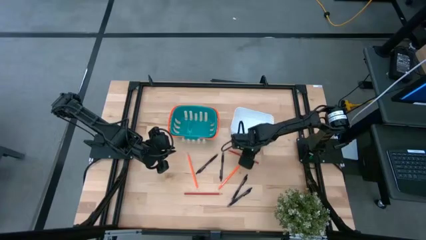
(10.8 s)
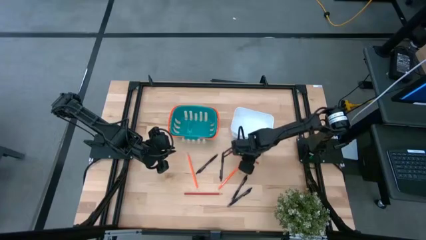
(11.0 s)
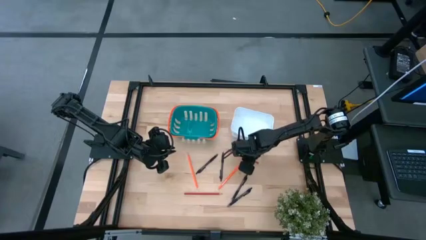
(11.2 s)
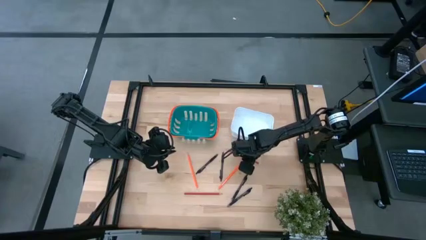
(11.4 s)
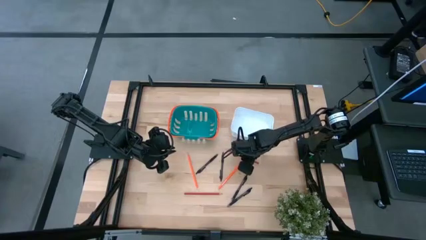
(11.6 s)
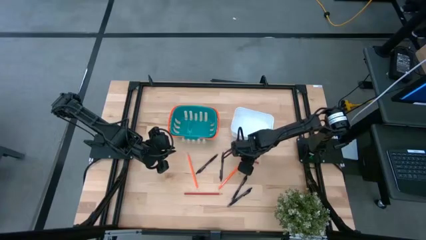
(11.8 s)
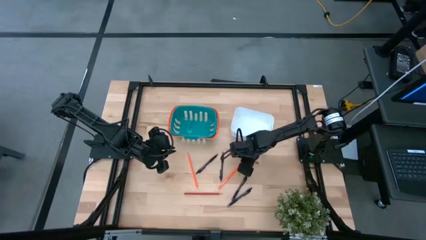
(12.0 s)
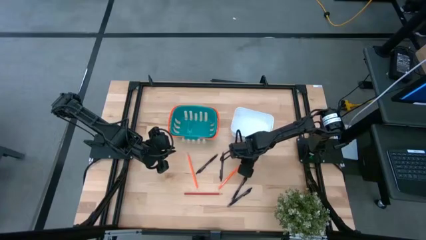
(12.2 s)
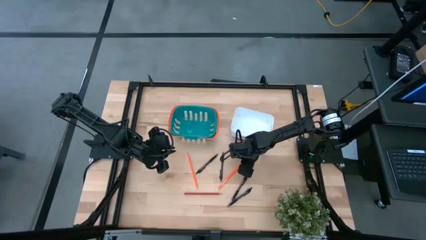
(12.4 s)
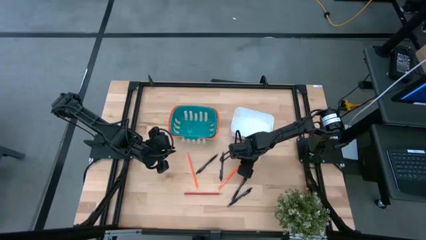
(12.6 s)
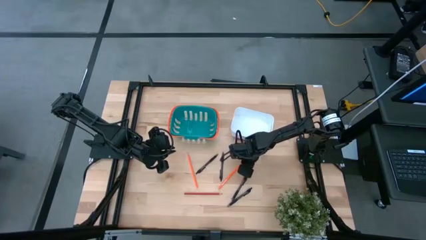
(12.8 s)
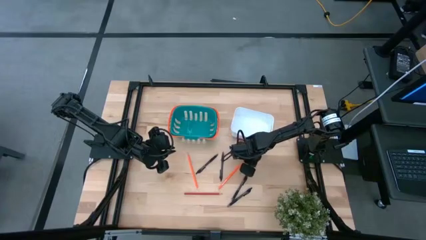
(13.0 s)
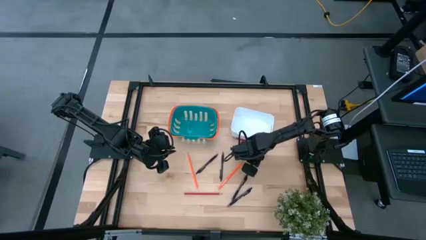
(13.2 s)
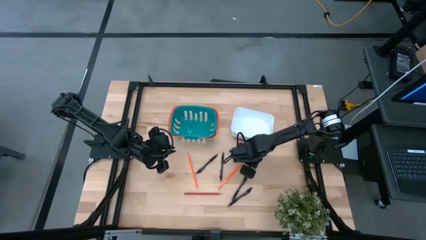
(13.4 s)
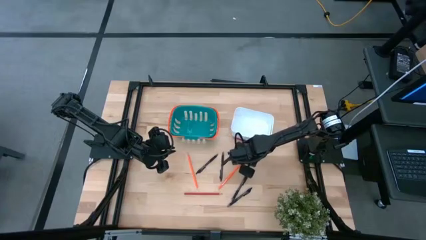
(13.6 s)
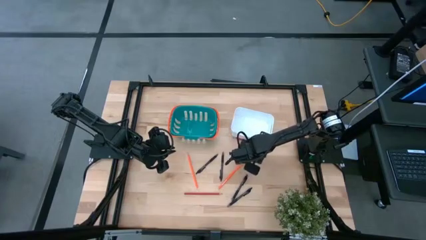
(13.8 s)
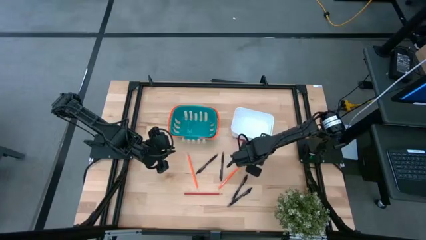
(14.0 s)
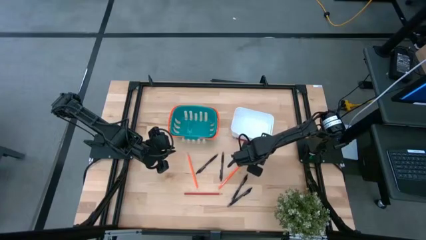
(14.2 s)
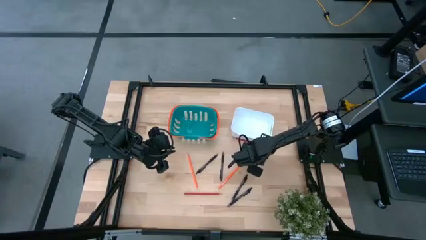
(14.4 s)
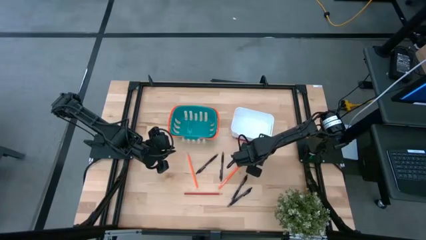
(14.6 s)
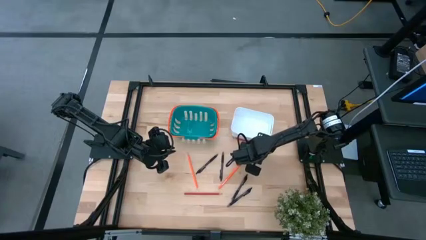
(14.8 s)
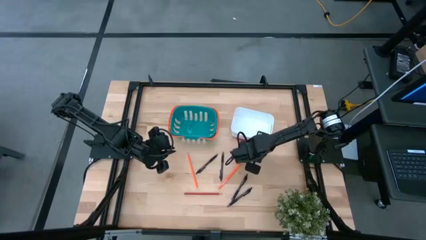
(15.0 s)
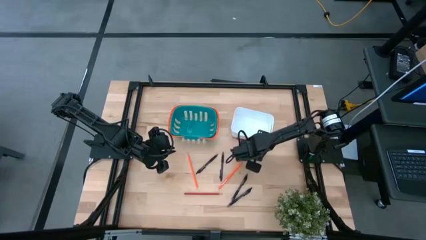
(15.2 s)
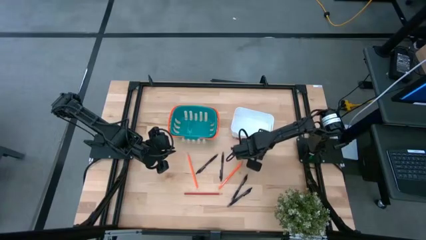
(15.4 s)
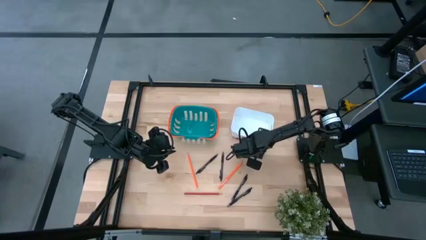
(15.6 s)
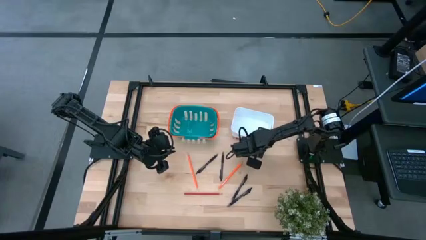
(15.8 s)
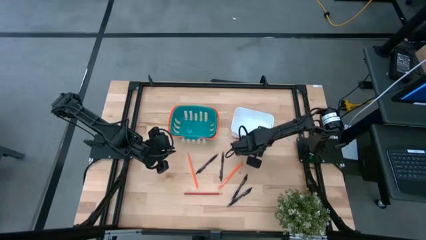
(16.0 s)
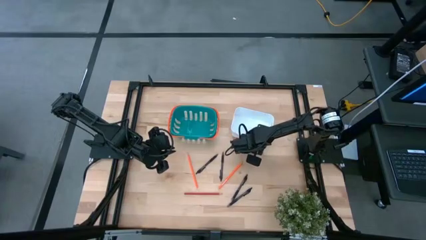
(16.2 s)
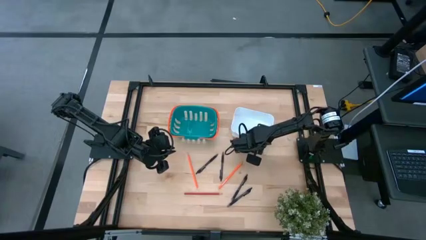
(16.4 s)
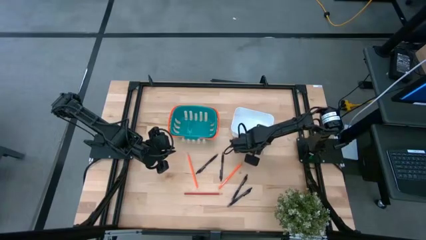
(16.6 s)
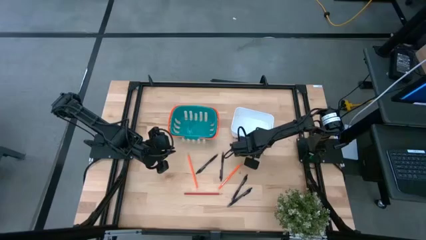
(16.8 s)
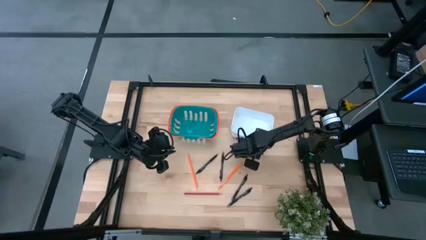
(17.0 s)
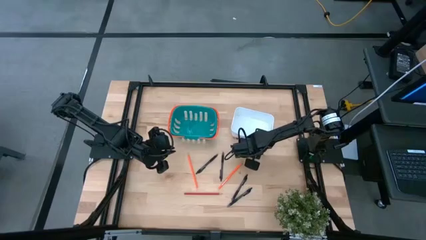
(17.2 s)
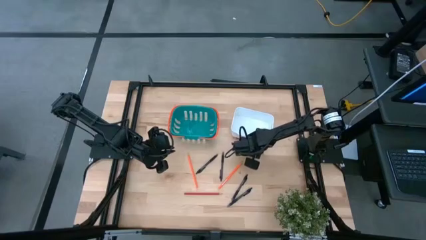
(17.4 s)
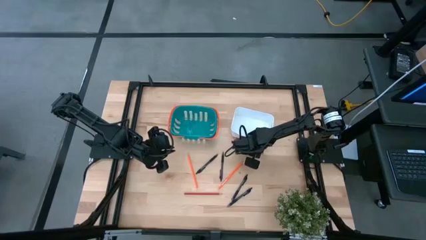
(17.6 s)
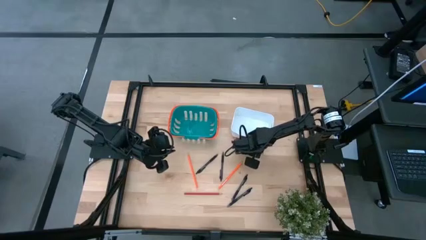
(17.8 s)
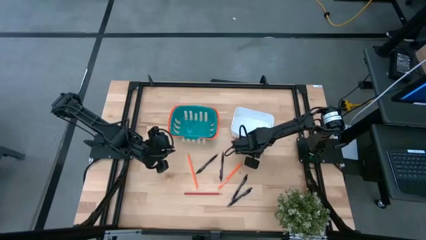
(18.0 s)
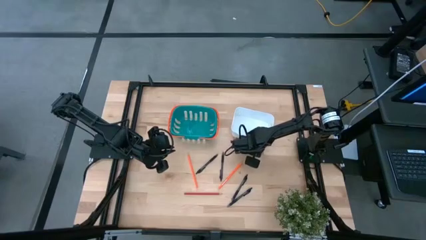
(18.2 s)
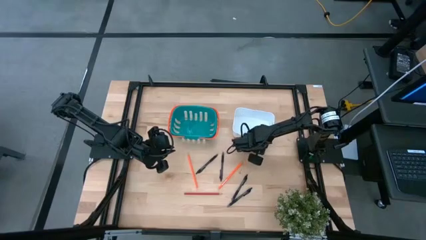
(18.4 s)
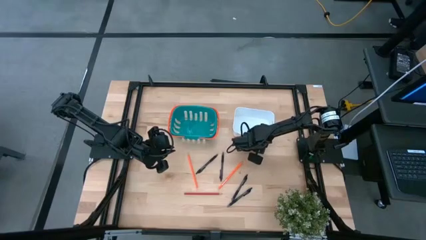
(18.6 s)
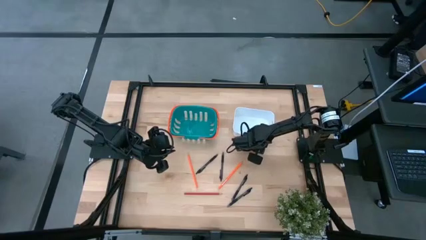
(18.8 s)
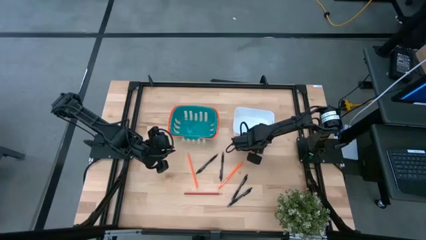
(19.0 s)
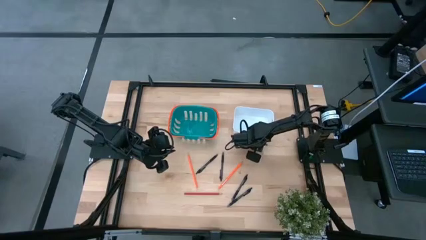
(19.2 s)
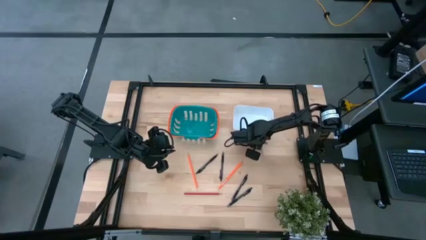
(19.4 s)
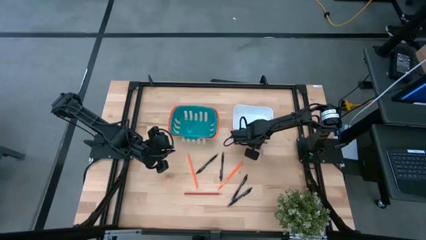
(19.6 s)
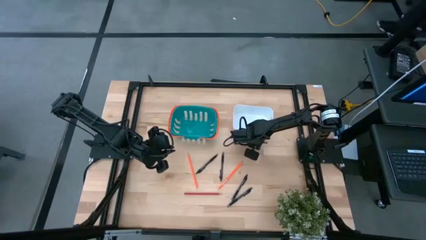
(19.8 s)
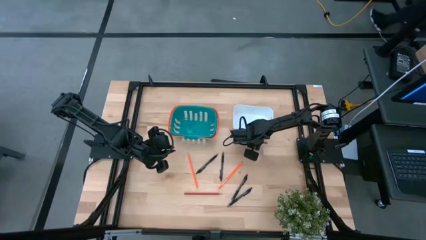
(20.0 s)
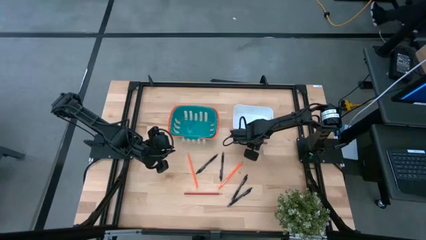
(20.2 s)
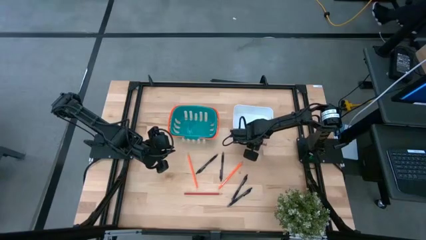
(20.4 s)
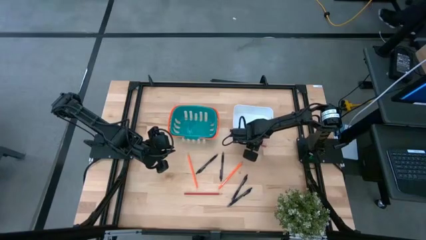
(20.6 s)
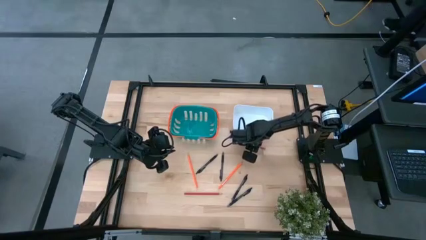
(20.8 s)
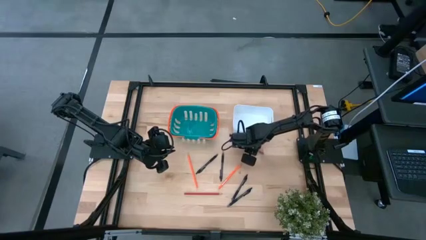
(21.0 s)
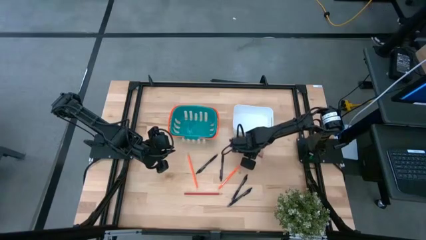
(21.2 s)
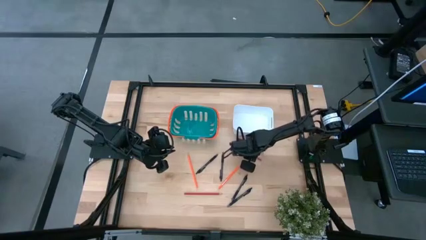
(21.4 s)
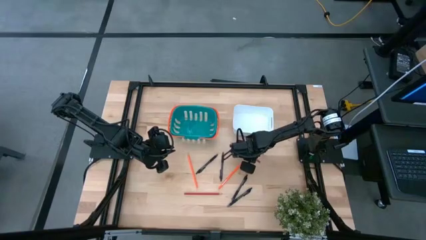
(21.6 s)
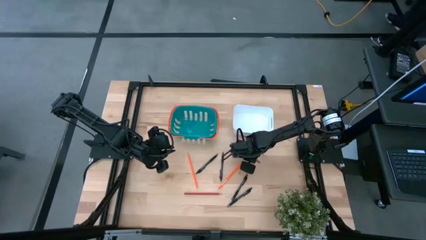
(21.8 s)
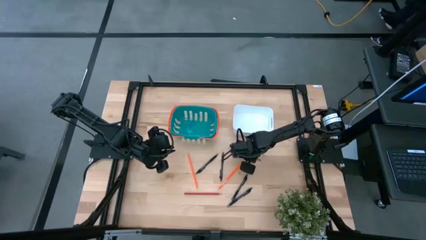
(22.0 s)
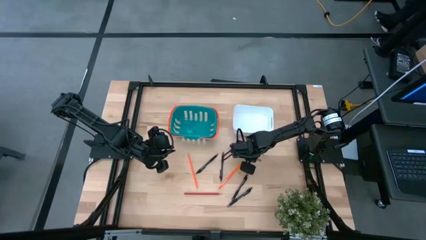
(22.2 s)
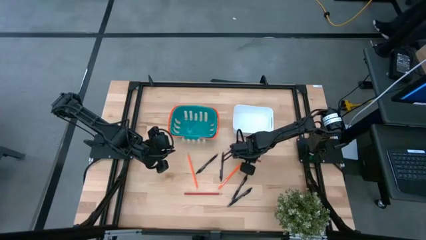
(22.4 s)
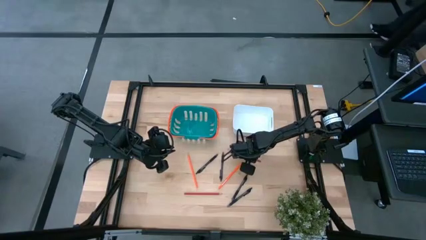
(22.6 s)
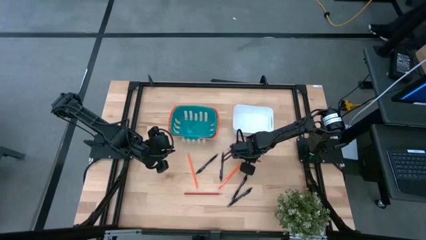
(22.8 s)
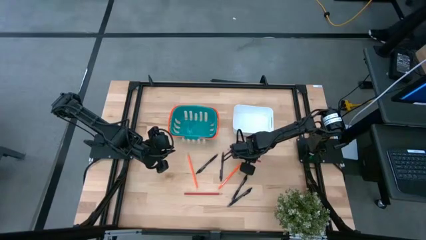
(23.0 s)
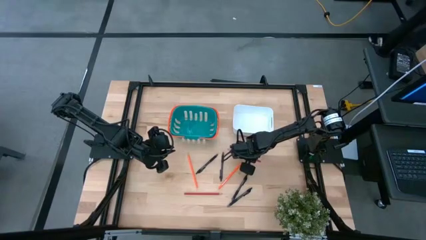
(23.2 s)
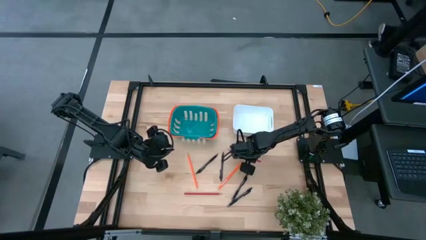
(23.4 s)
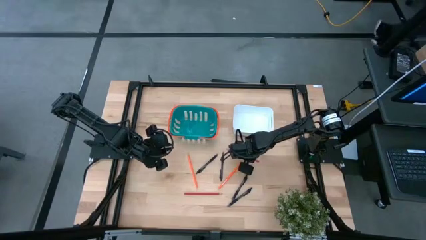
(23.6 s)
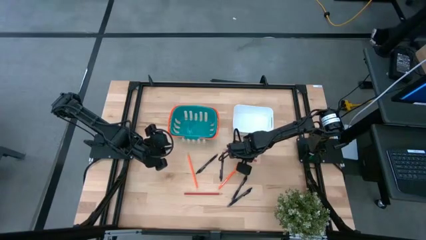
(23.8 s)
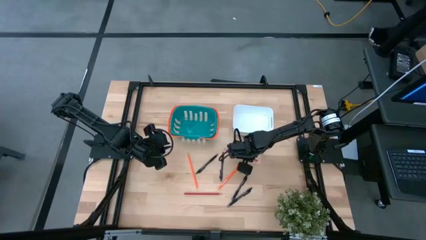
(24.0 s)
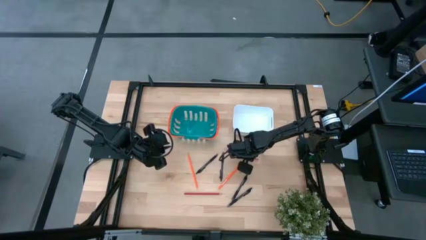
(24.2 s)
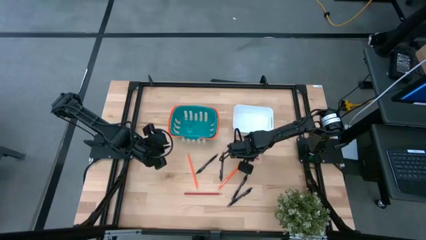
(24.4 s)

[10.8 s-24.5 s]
Task: Sort pens & pencils
Put the top red pencil into the blue bin

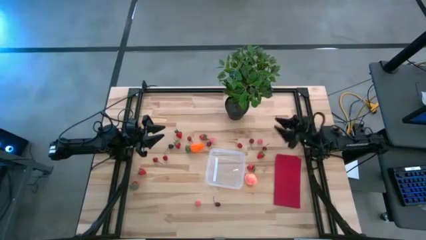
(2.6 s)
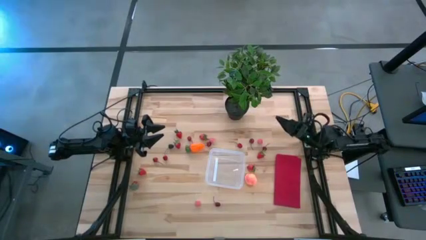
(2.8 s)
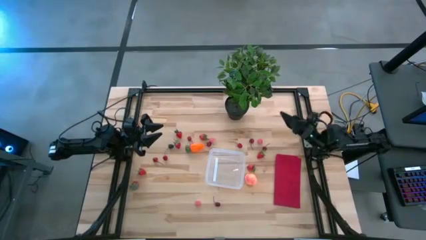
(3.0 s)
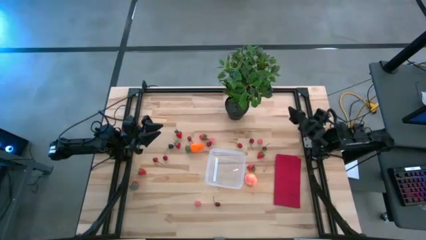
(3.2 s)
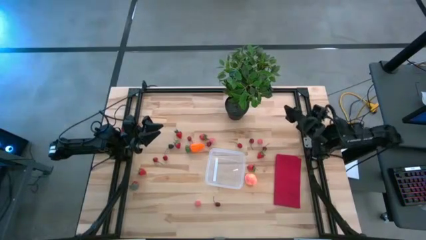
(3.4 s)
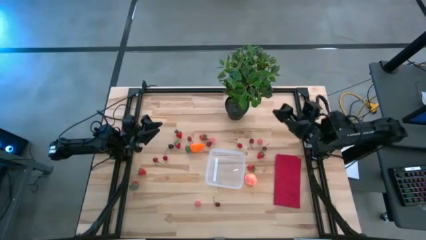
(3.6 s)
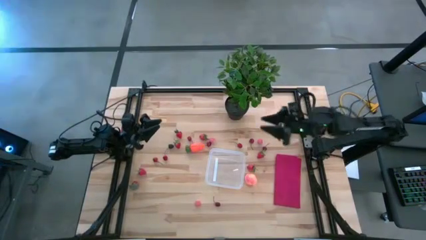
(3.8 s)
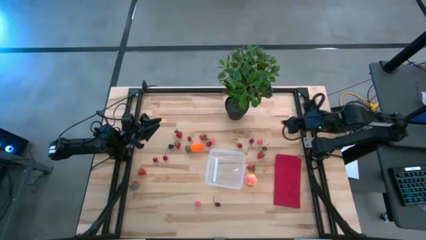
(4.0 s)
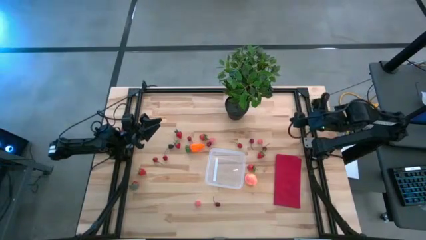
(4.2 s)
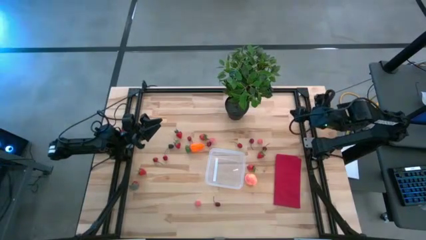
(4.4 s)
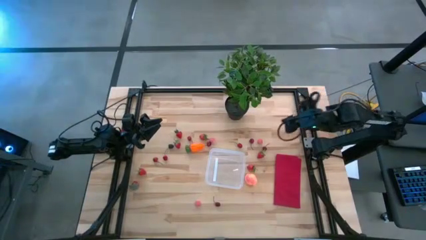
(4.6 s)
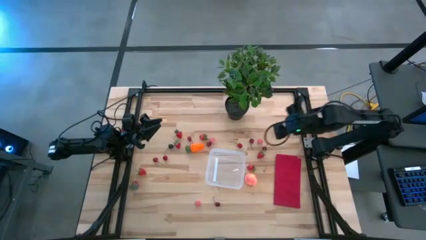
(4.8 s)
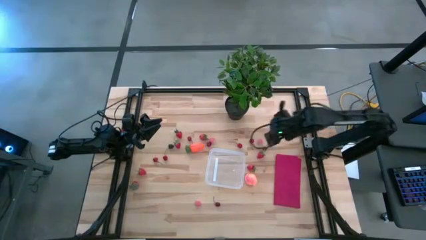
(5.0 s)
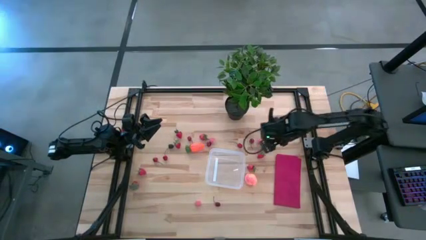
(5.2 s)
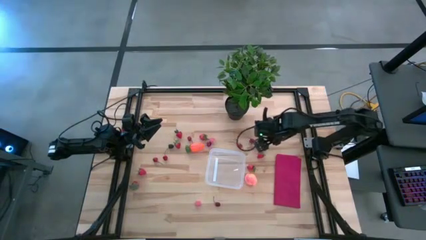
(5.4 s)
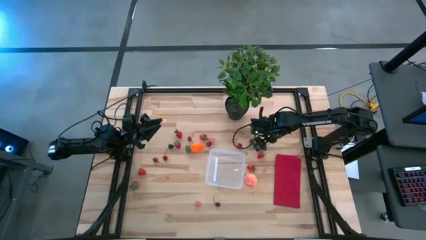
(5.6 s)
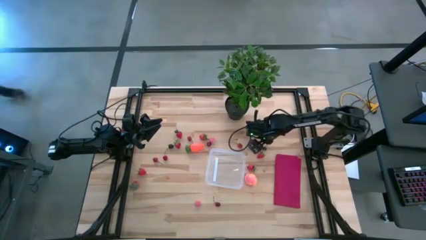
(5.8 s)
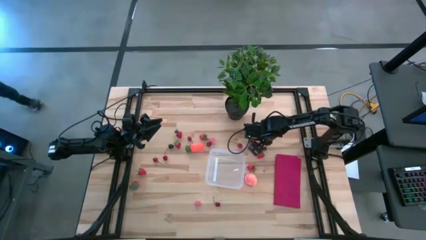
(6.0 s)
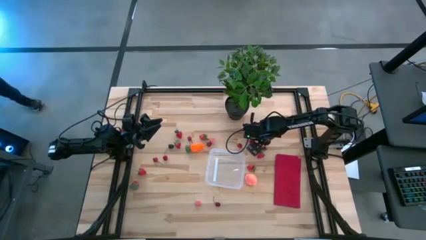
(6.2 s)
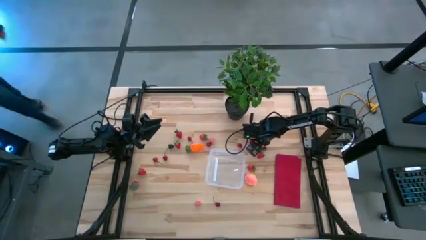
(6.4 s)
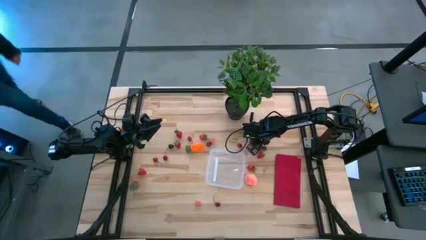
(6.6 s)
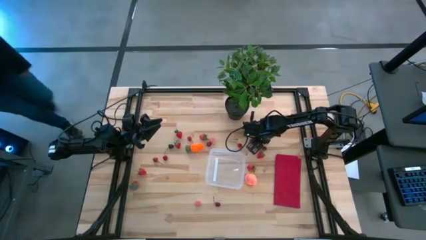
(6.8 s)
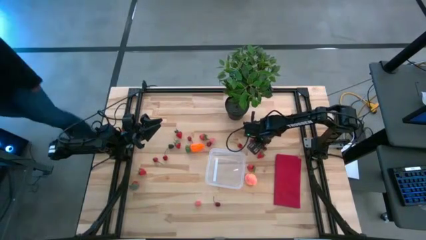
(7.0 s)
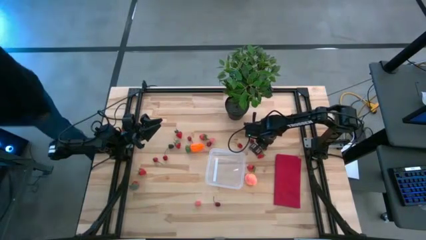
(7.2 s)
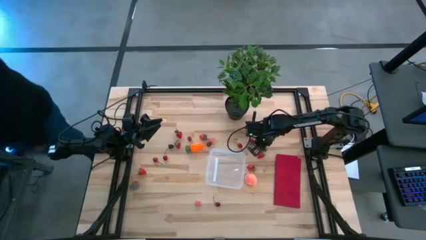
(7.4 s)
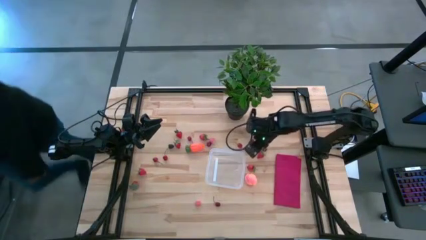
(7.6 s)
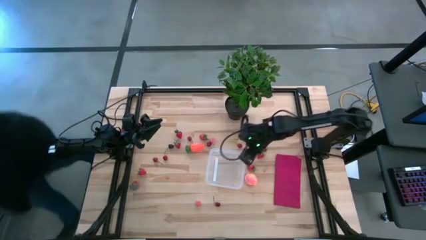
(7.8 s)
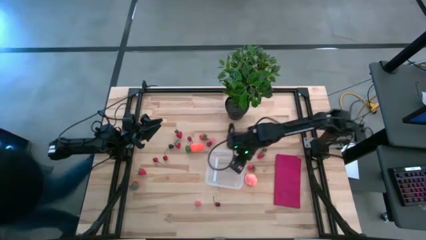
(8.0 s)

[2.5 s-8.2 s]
Task: Pick and placing Produce into tupperware
Put the pink peach into the transparent bin
